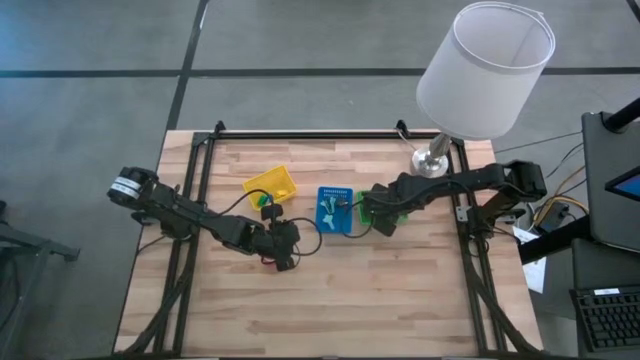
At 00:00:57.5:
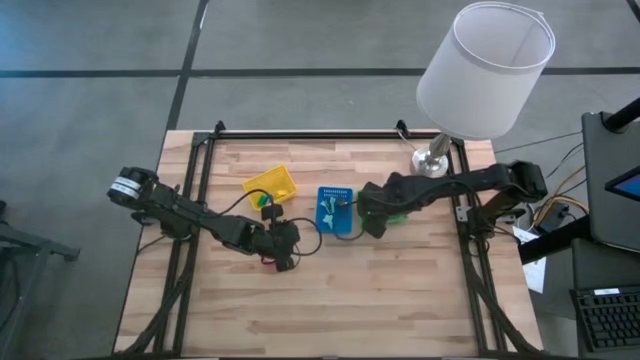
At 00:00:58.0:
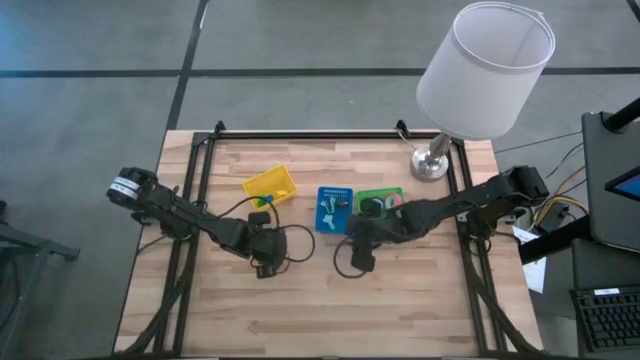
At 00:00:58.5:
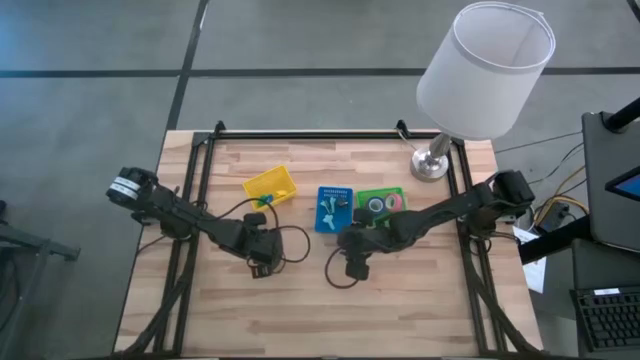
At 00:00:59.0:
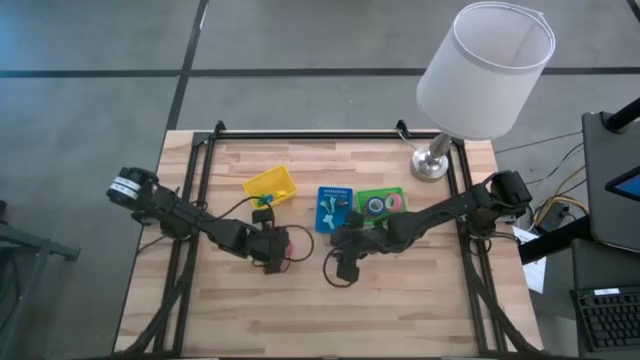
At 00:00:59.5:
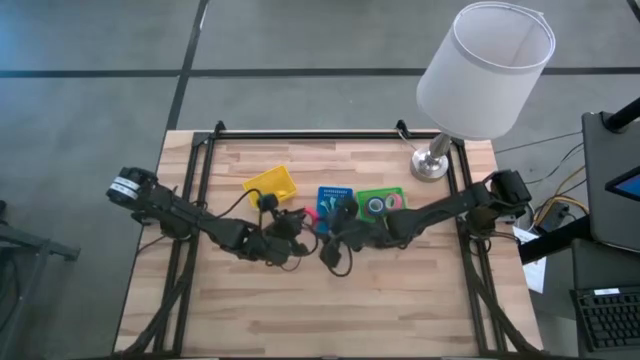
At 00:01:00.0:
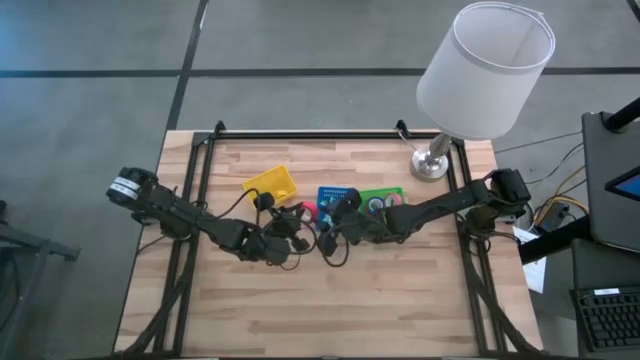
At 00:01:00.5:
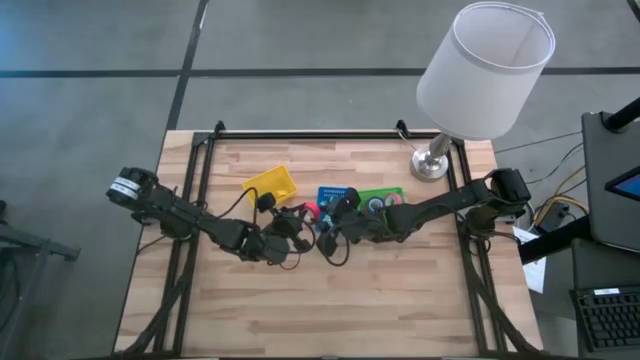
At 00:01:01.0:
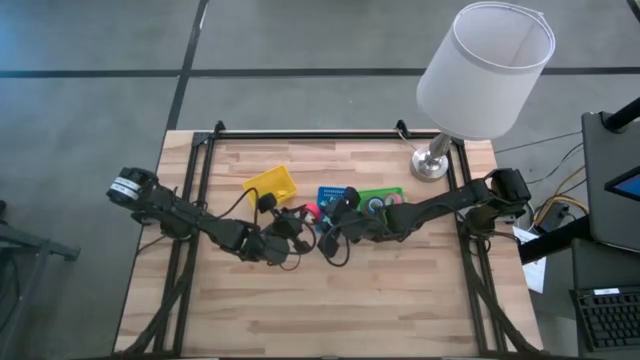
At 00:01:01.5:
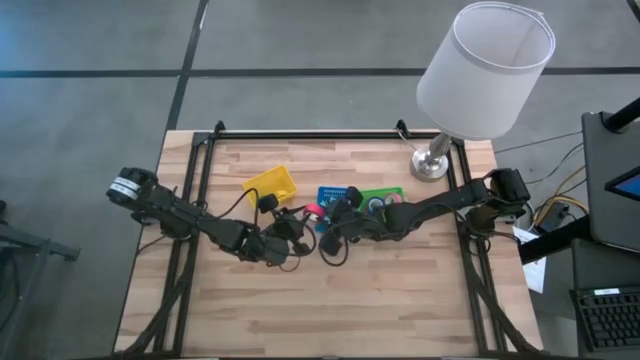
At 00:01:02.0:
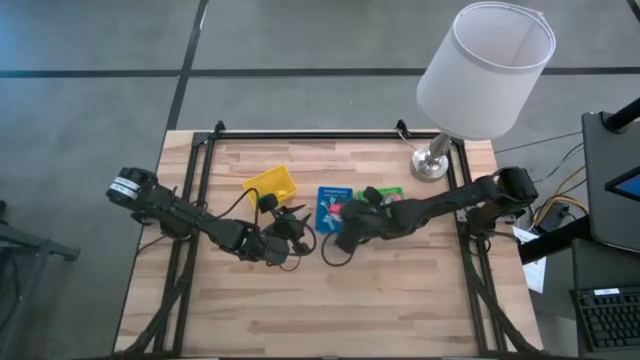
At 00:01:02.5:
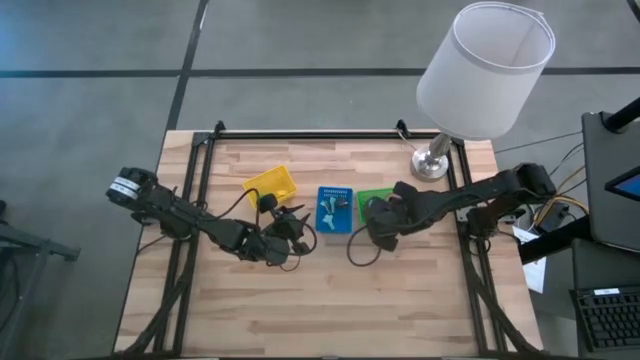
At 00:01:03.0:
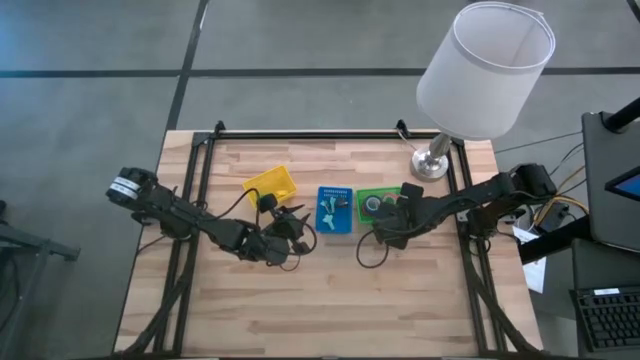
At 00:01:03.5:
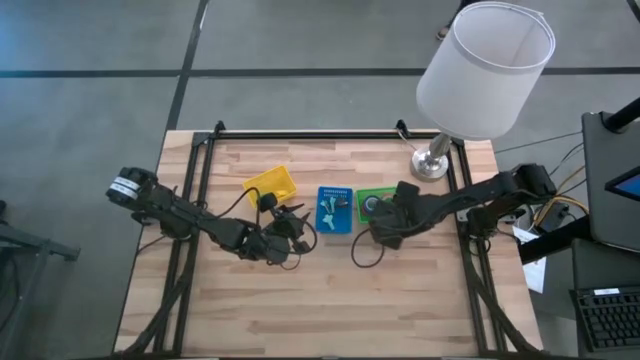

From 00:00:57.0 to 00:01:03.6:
Task: Pick and place Stapler, Stapler remover, tape
Put the orange tape into the green basket

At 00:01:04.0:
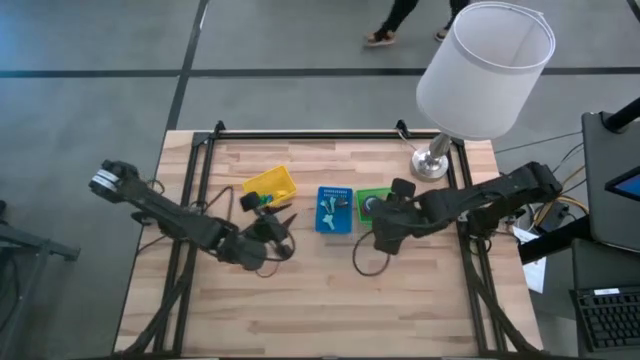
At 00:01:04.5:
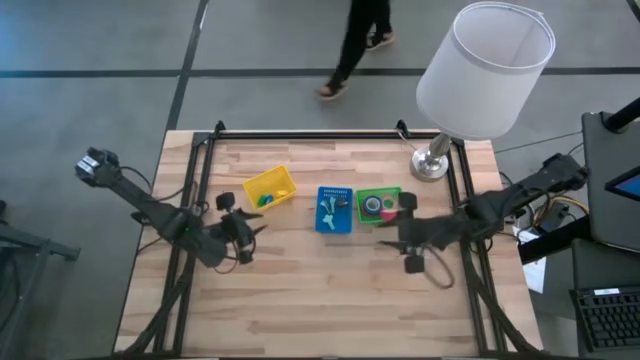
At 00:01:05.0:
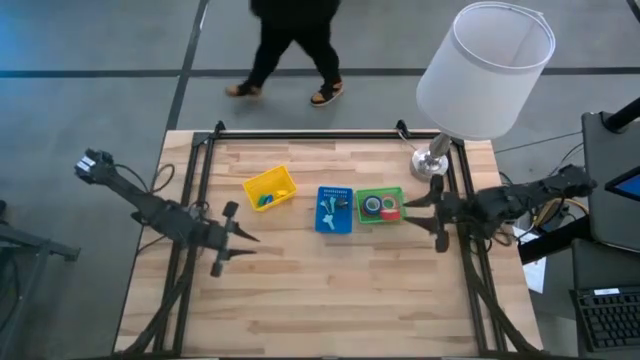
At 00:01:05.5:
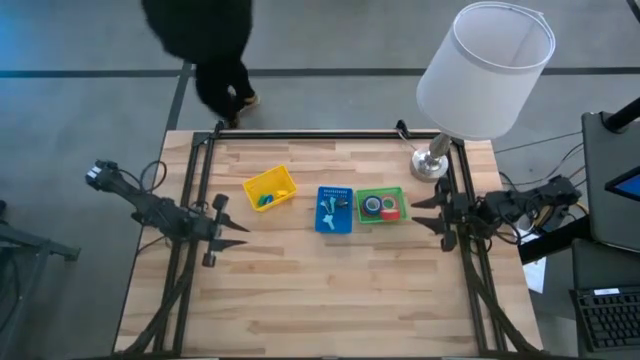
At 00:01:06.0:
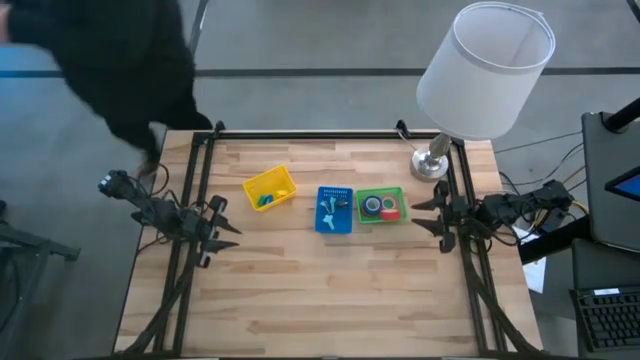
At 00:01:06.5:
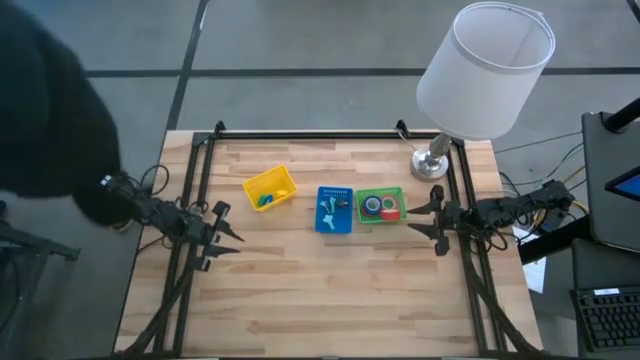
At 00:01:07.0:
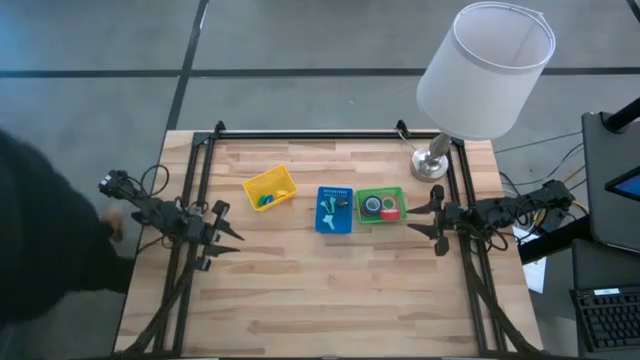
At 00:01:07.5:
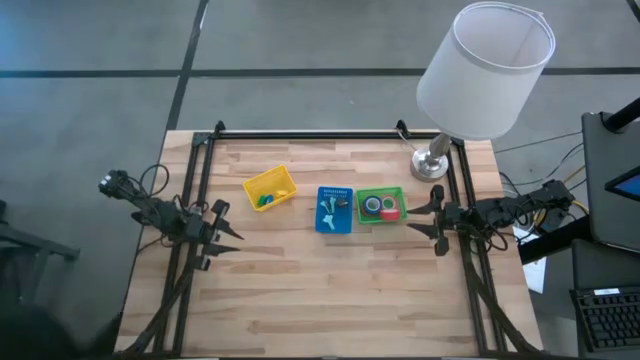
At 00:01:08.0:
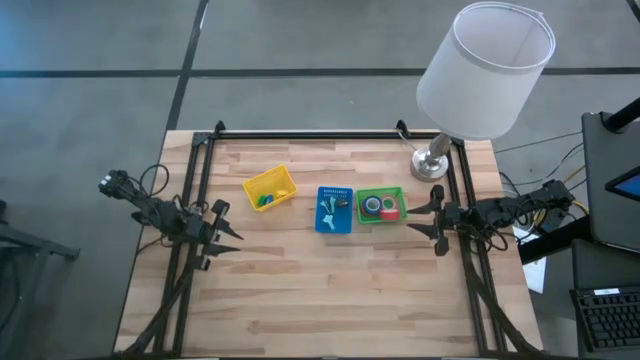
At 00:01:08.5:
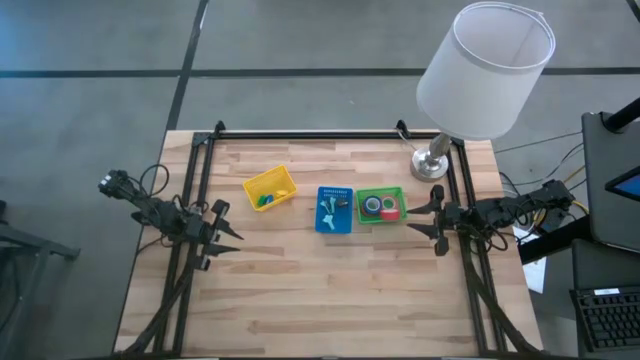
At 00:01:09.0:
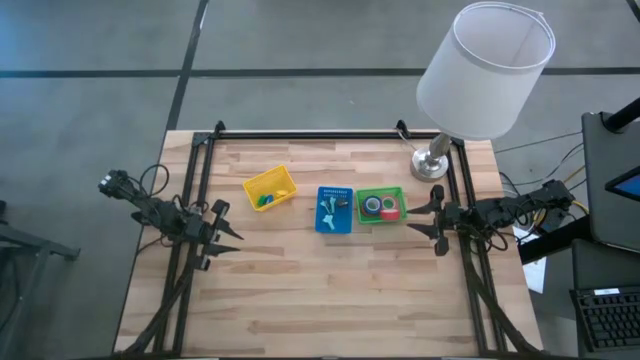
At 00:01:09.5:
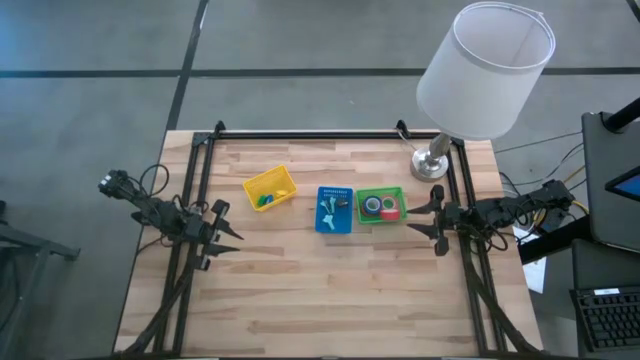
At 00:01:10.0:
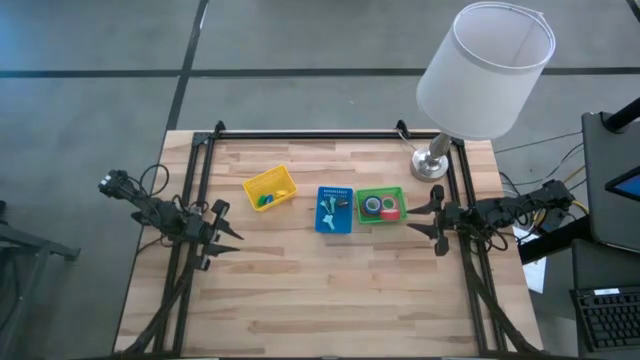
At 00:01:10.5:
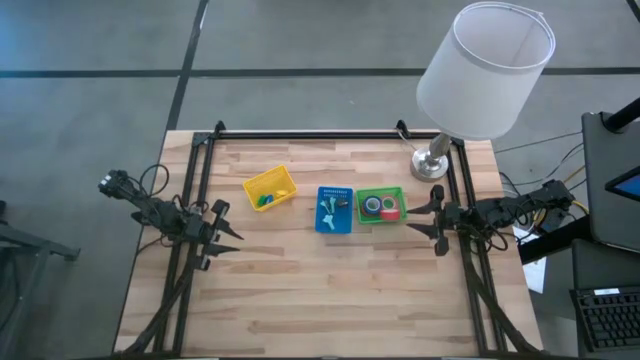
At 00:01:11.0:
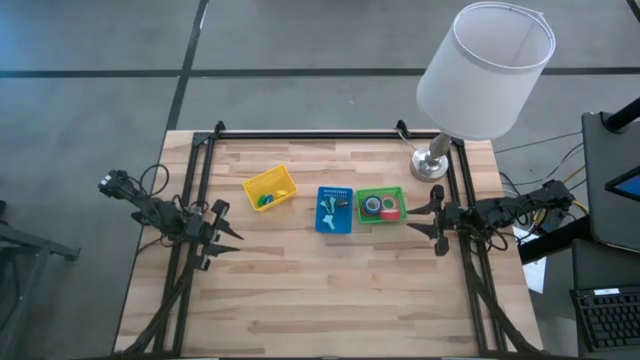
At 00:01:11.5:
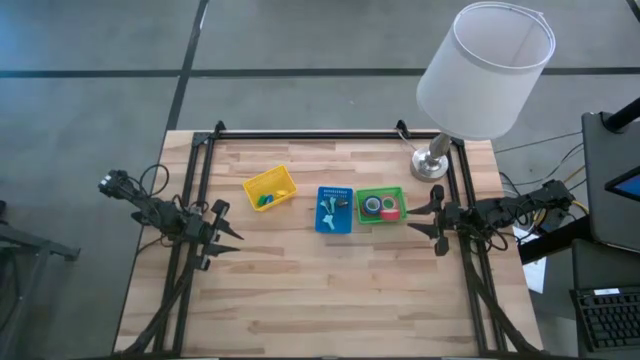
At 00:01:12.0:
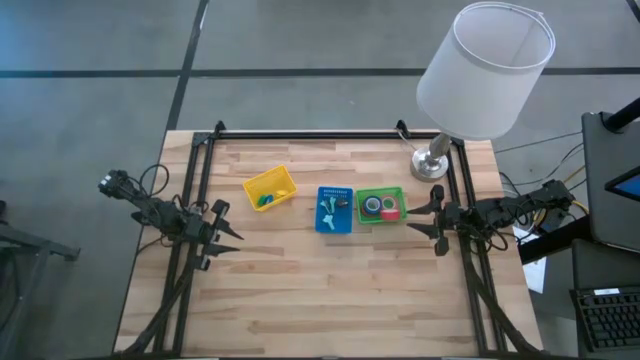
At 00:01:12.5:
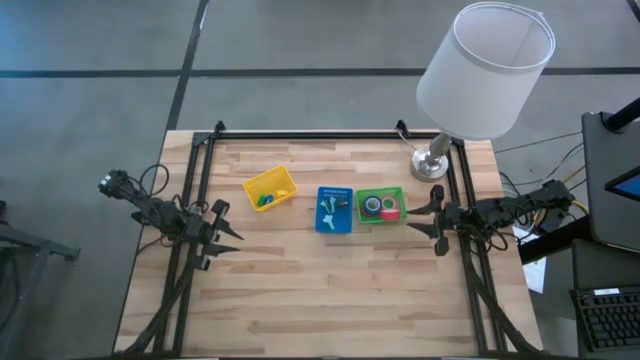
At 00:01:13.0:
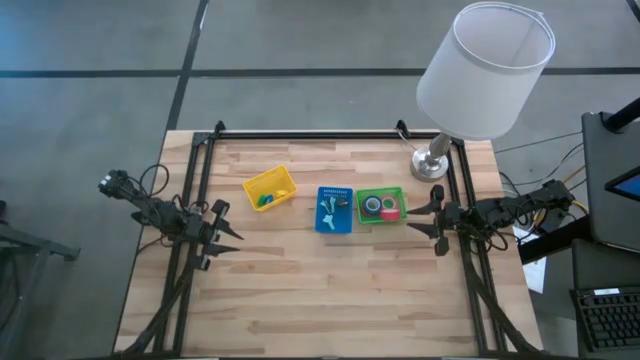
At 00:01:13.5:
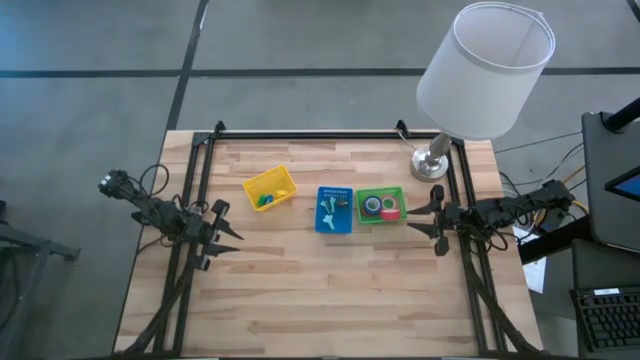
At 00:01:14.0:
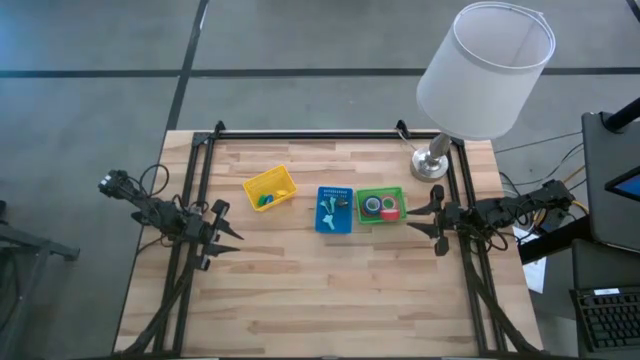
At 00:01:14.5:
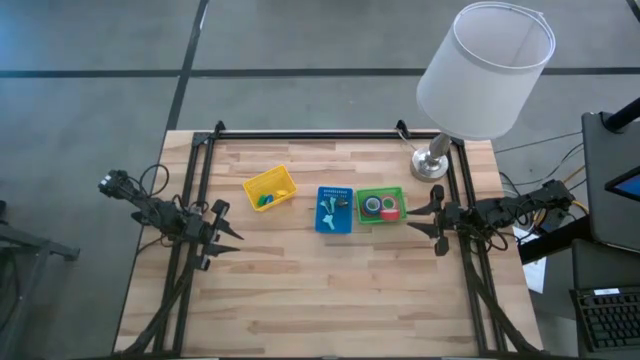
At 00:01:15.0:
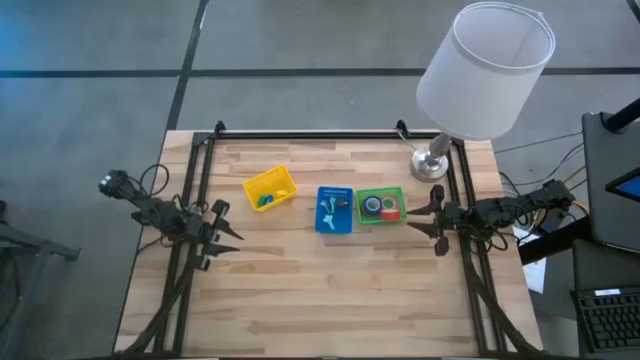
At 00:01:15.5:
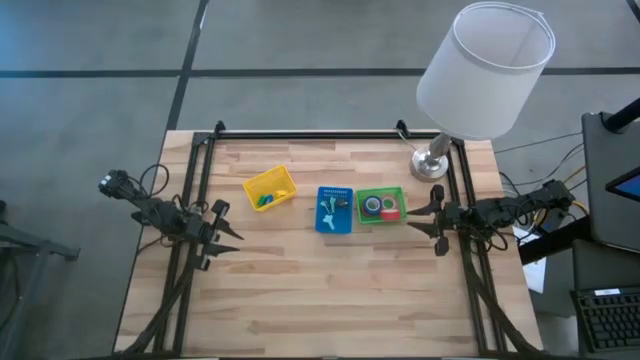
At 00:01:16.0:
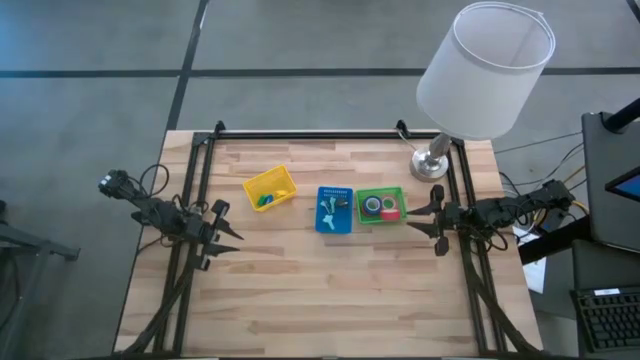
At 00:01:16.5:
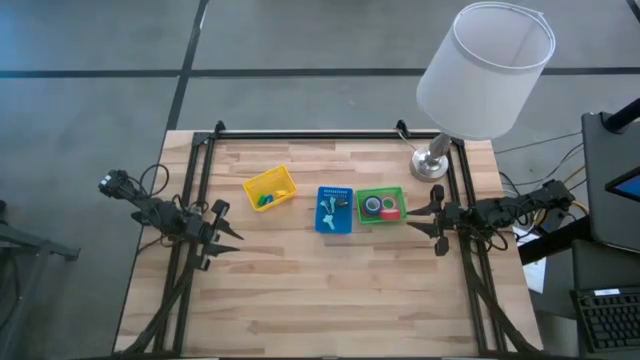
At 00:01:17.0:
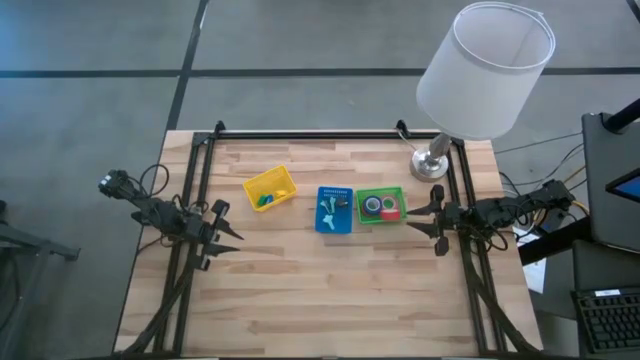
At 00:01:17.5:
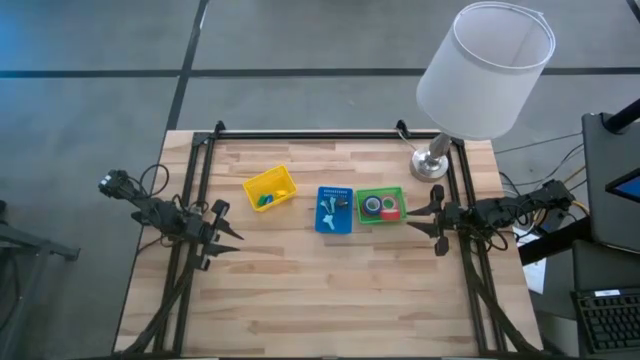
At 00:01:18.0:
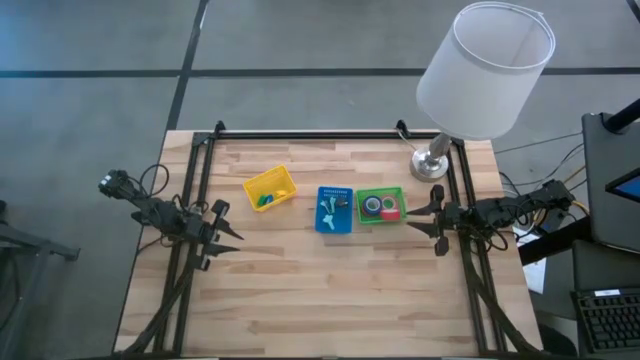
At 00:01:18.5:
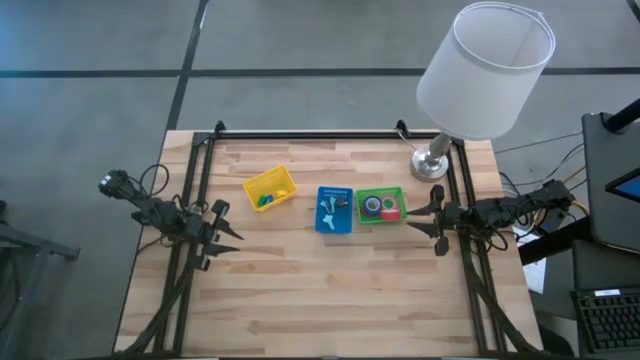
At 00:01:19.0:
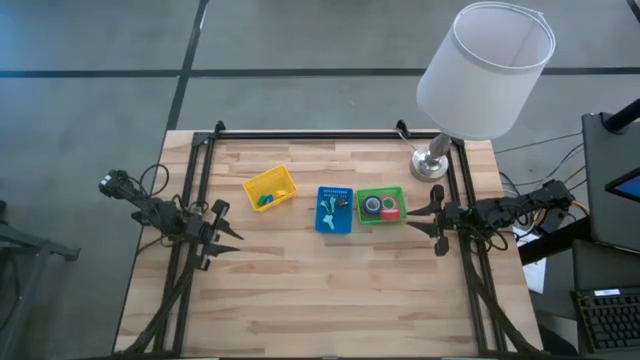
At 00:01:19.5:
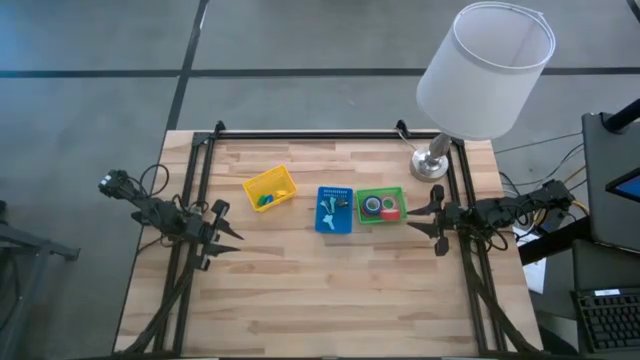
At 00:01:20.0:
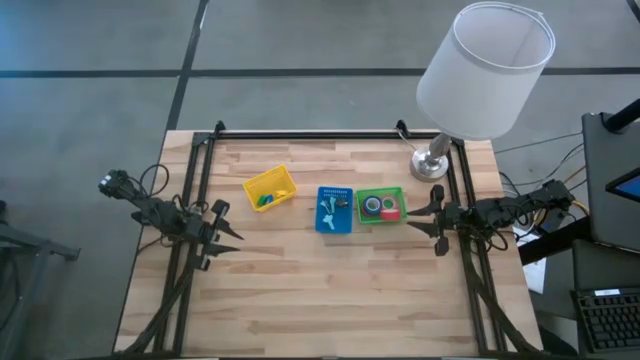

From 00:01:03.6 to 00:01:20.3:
Return to Home Position
